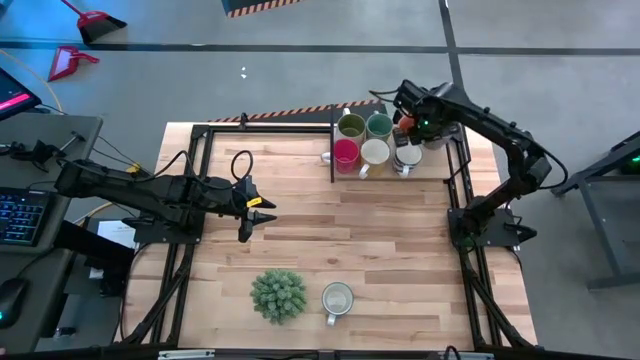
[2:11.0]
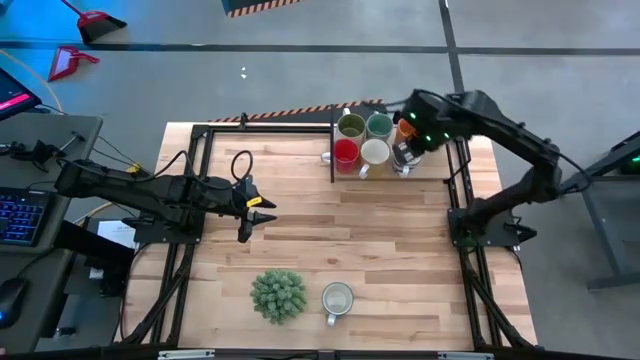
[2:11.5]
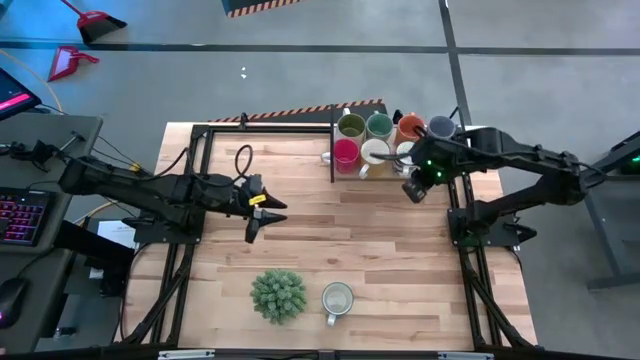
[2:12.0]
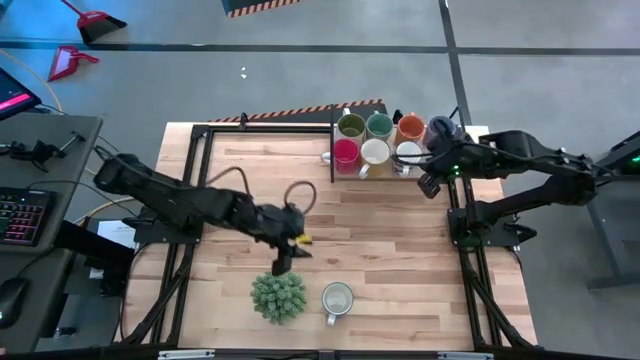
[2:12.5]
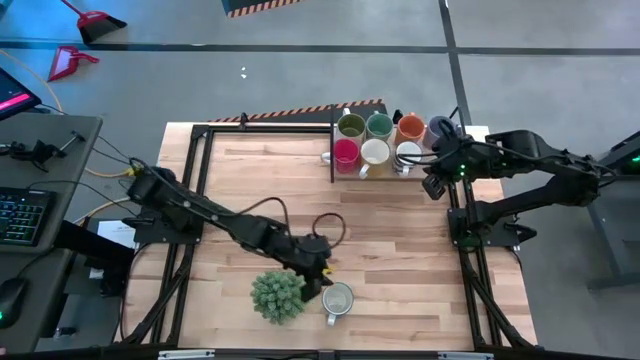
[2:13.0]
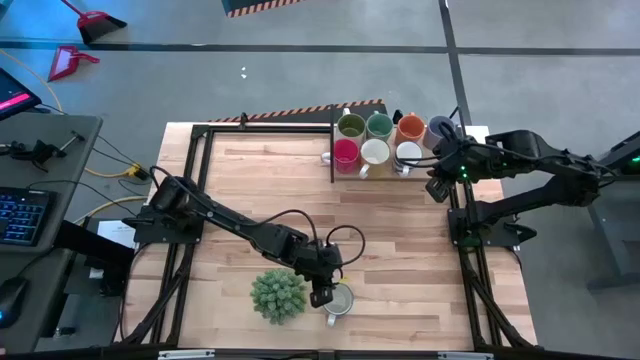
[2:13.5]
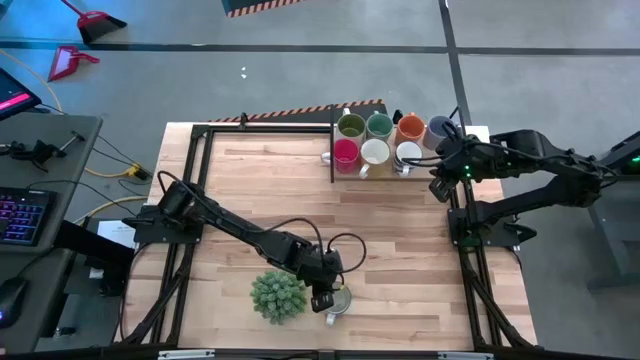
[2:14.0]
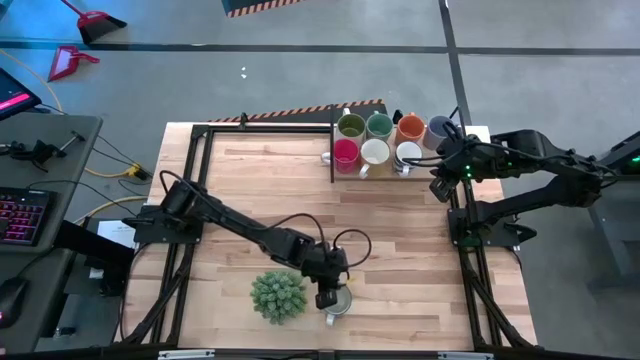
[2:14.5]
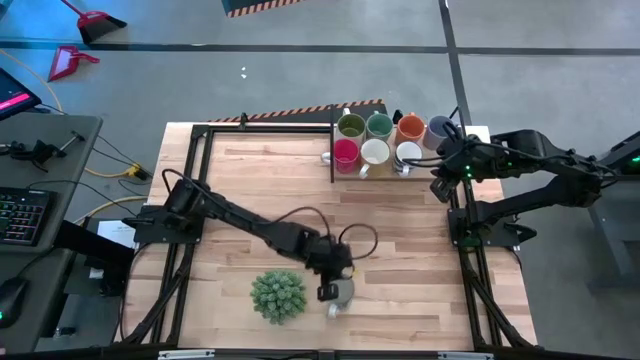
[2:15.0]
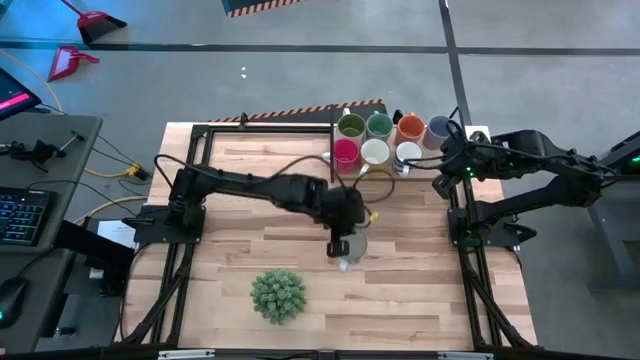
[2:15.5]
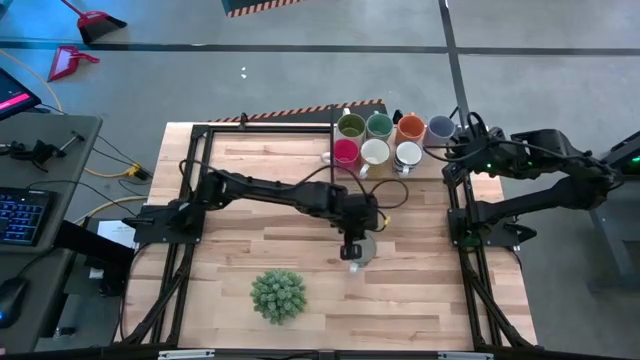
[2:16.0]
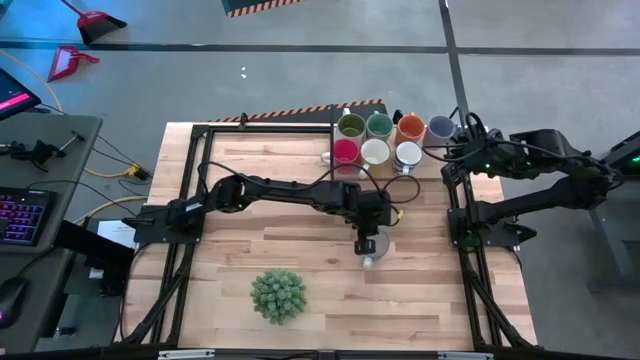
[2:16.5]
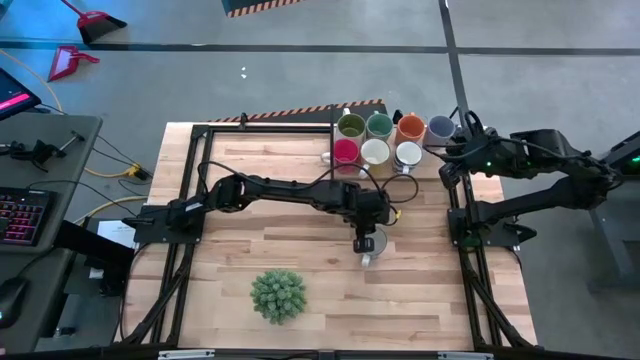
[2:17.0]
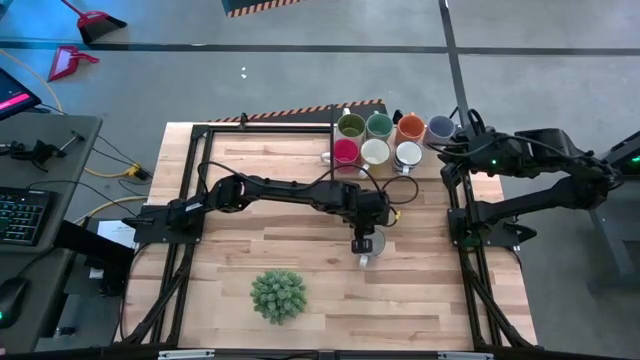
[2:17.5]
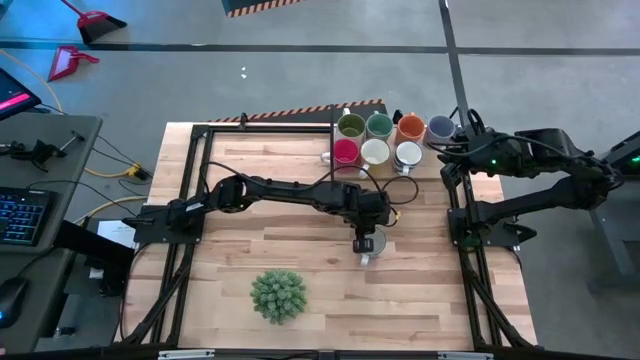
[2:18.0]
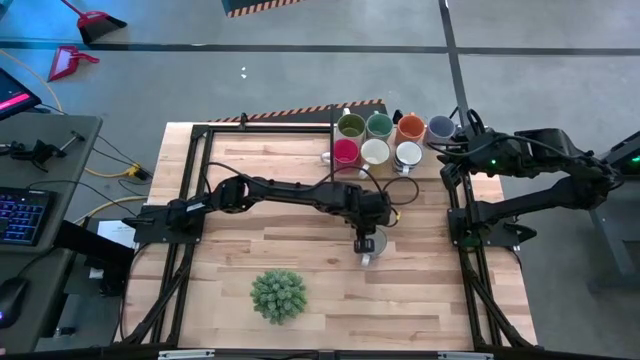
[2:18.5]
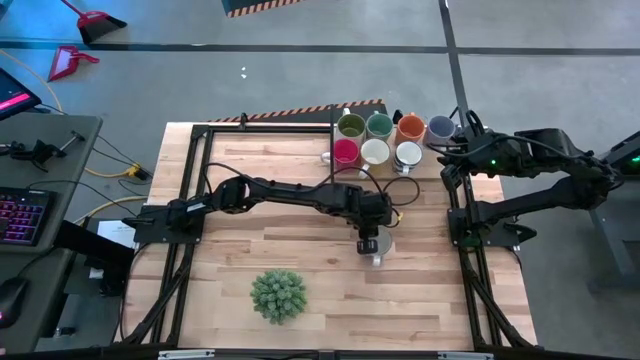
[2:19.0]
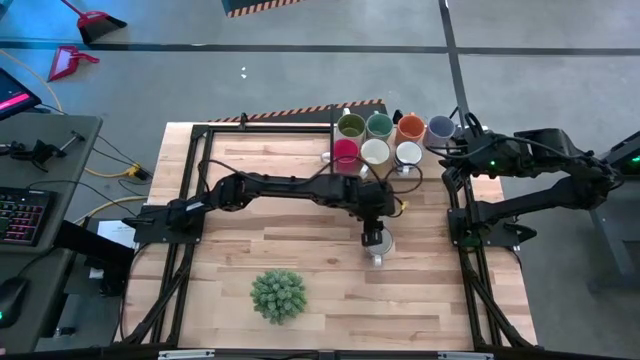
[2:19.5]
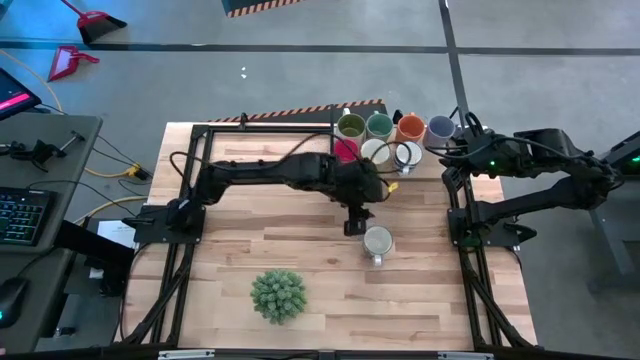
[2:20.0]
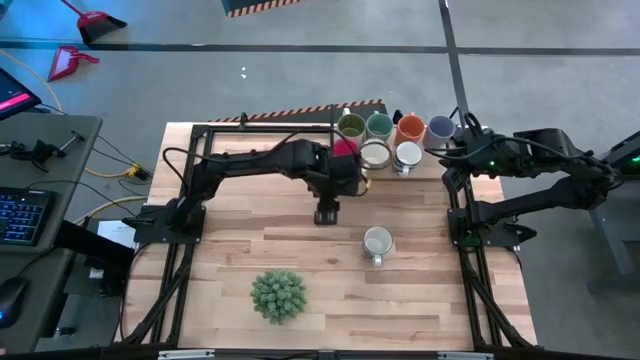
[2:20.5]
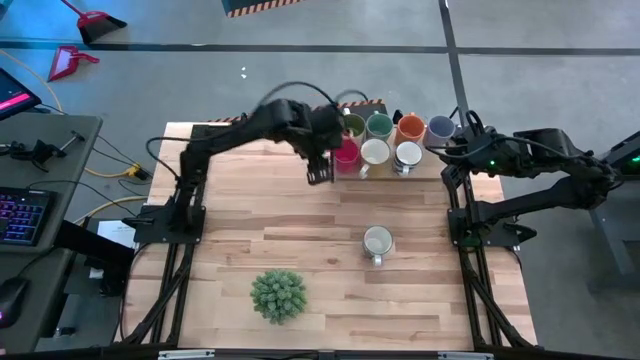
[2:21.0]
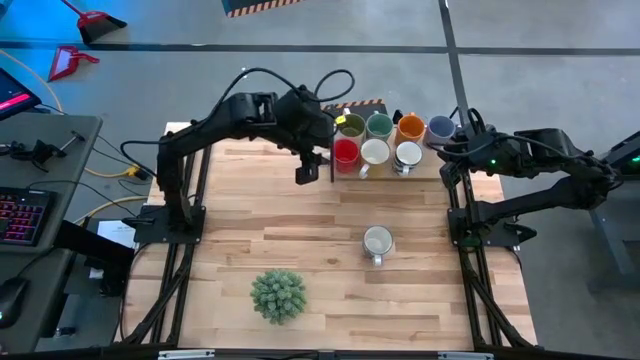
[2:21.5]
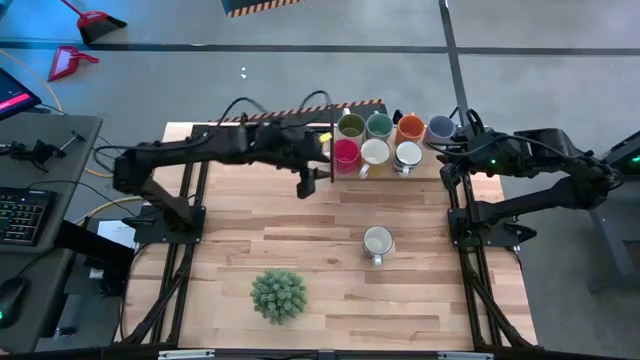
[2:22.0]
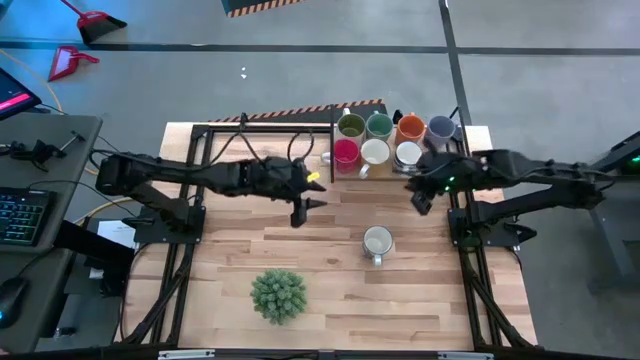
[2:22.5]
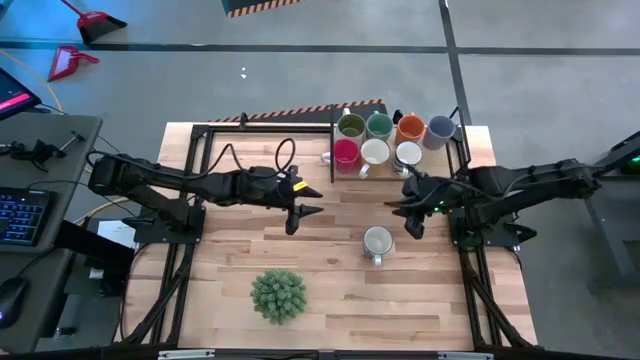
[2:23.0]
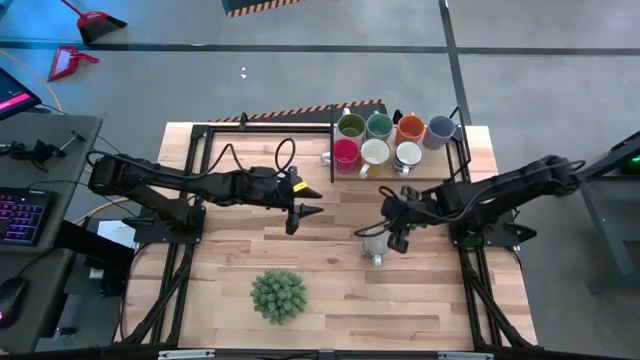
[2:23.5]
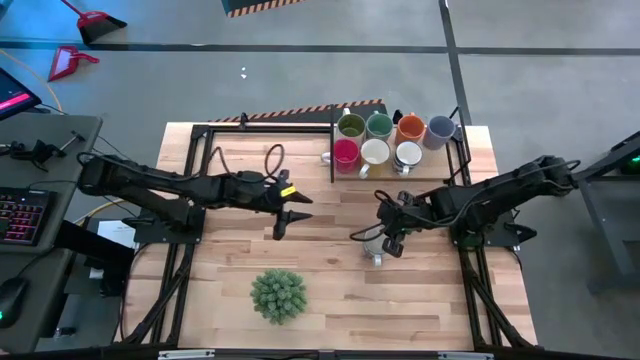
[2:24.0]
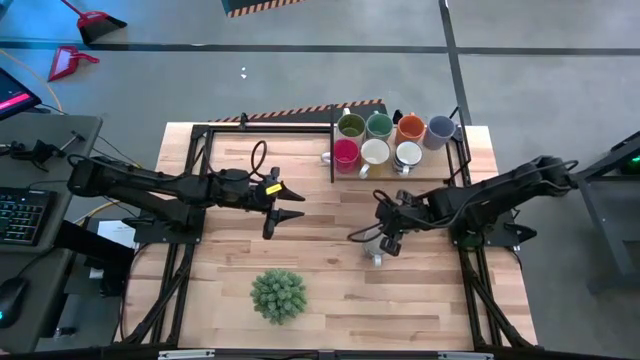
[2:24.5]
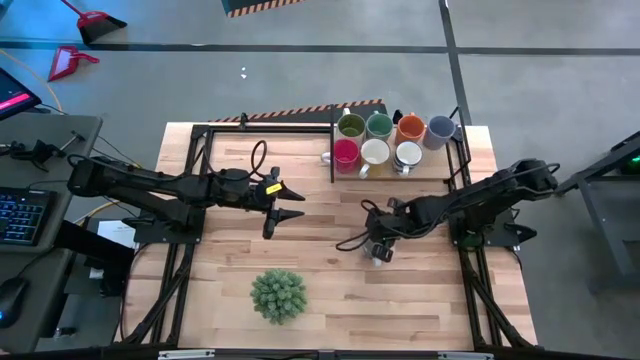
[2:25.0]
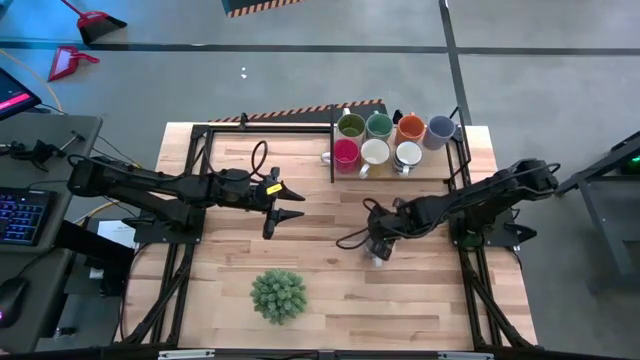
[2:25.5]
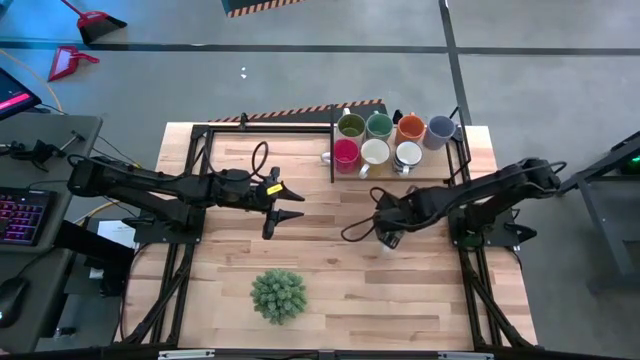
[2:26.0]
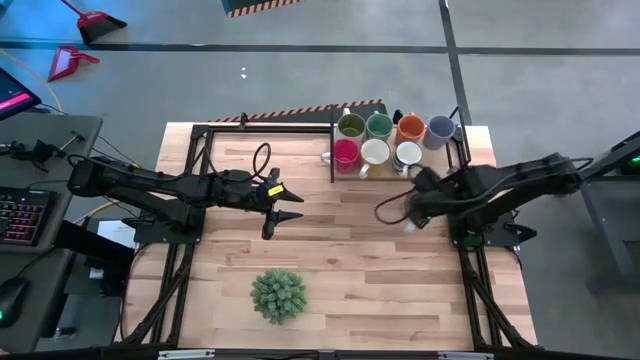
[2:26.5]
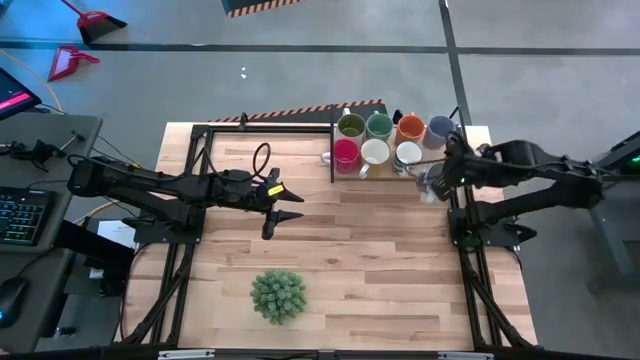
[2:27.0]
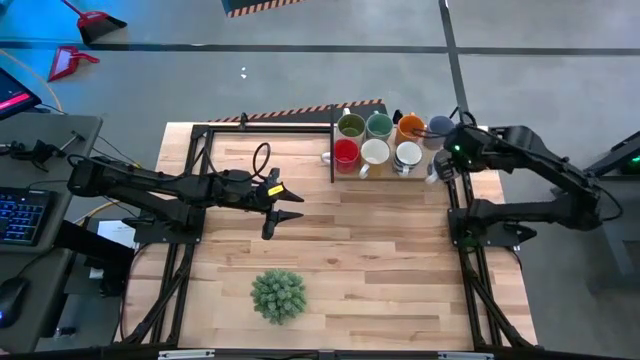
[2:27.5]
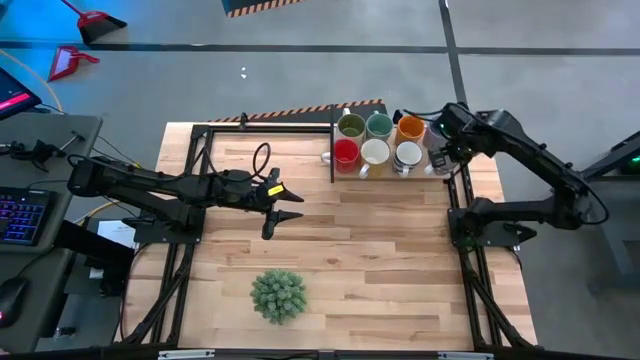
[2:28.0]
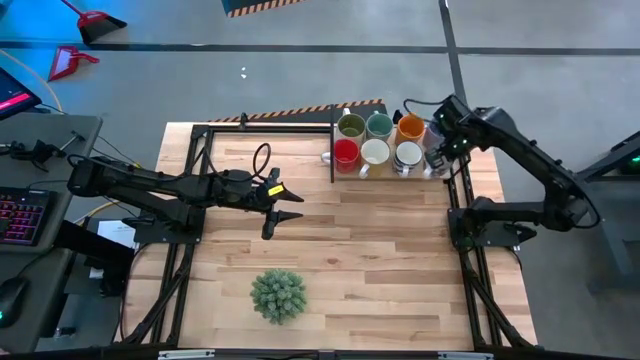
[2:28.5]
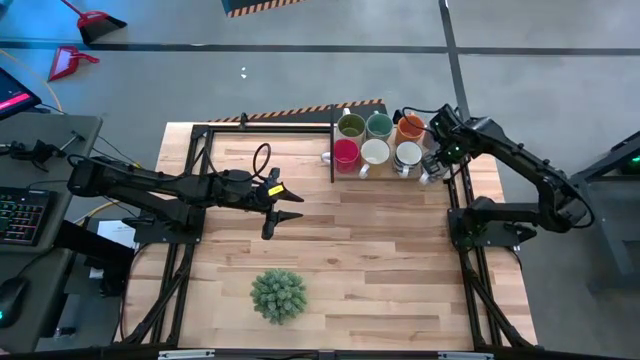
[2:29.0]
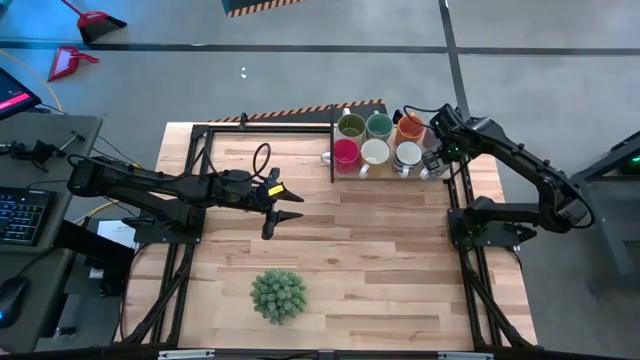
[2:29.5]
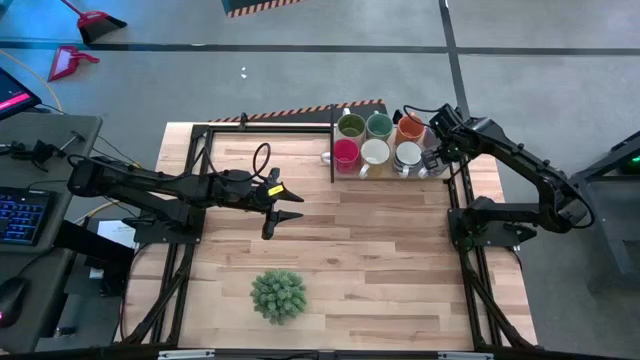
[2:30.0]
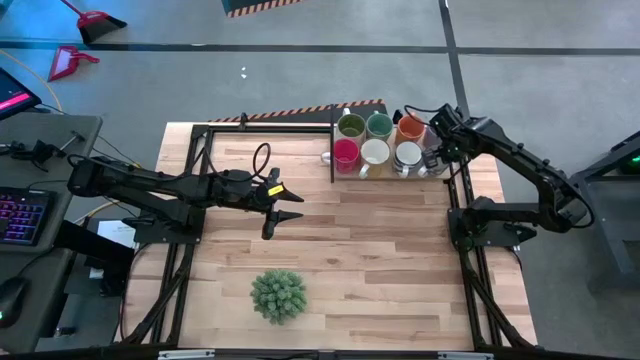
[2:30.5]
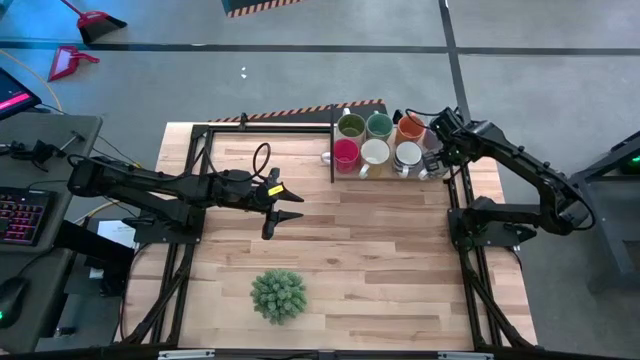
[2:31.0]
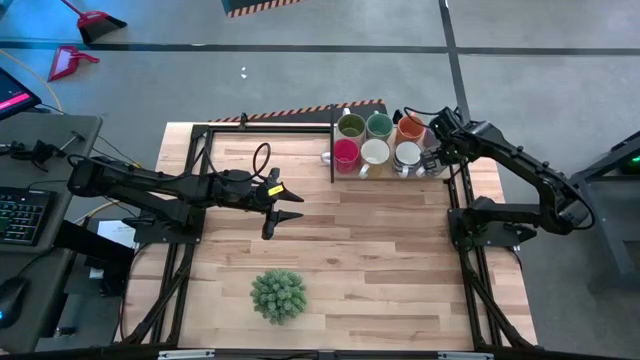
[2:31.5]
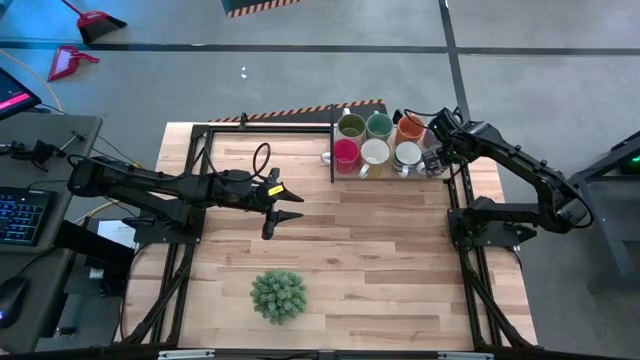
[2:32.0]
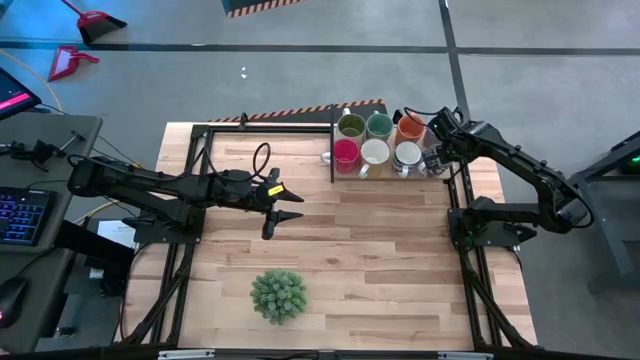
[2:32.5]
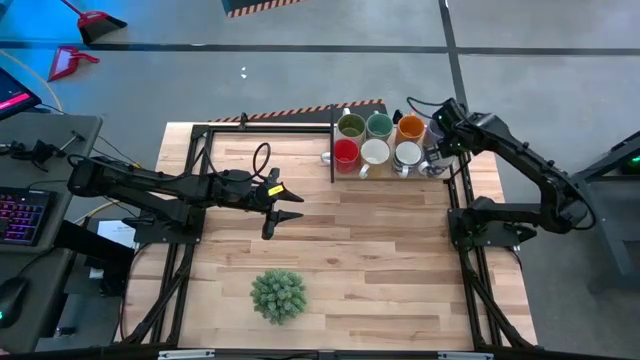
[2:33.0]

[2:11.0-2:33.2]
Task: Place coffee mugs
Put the white mug on the shelf
